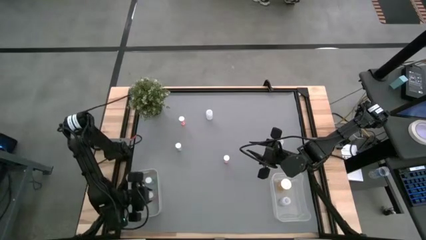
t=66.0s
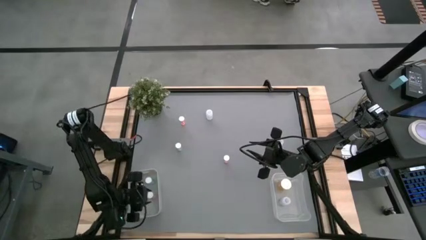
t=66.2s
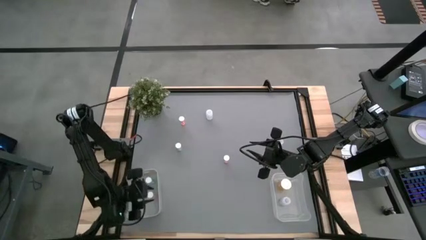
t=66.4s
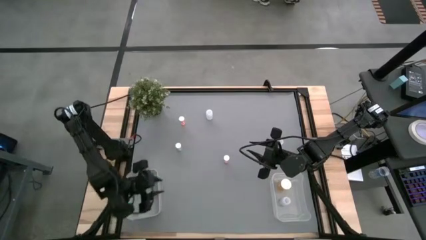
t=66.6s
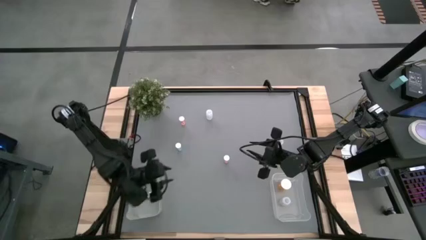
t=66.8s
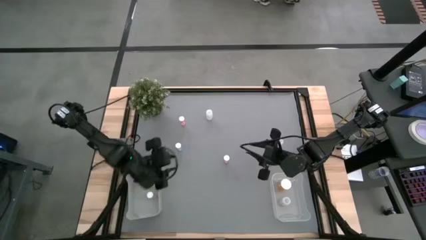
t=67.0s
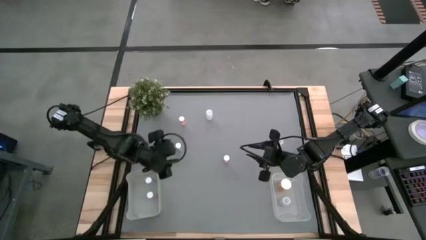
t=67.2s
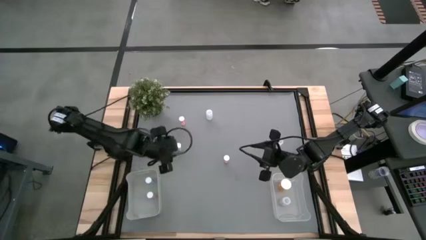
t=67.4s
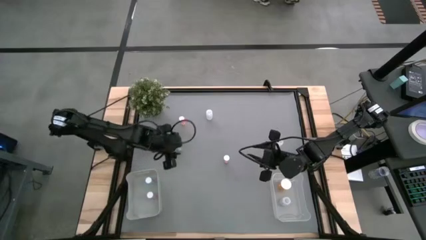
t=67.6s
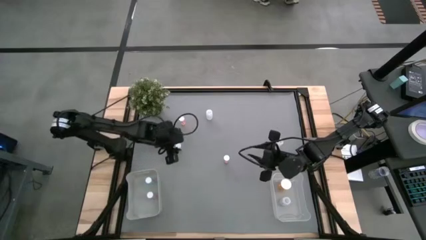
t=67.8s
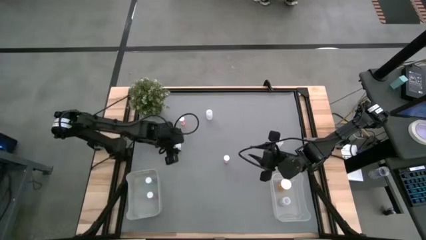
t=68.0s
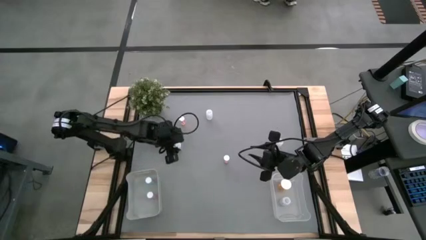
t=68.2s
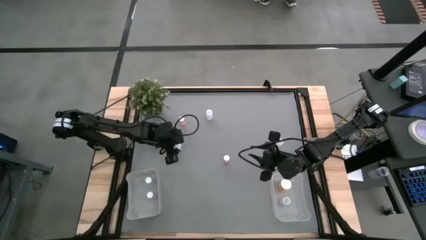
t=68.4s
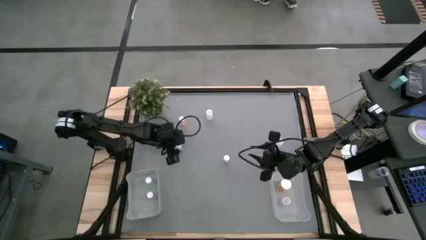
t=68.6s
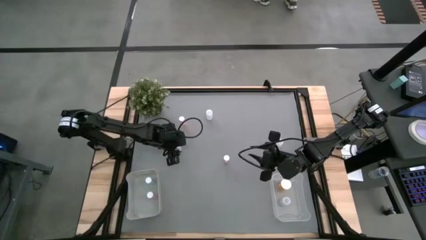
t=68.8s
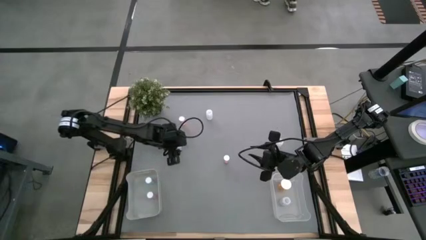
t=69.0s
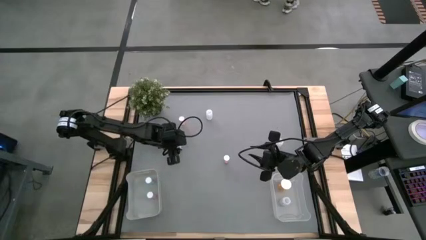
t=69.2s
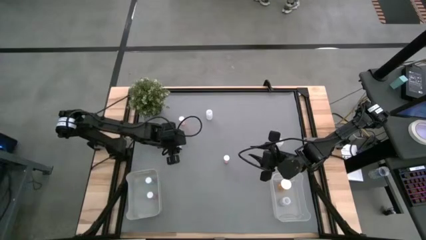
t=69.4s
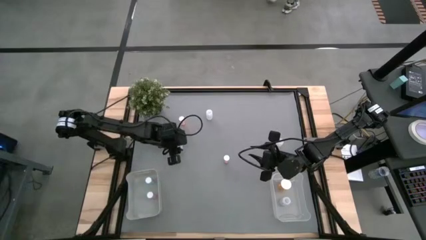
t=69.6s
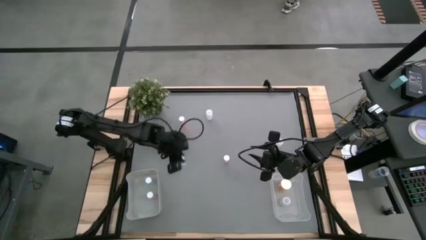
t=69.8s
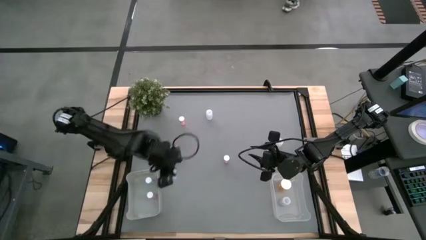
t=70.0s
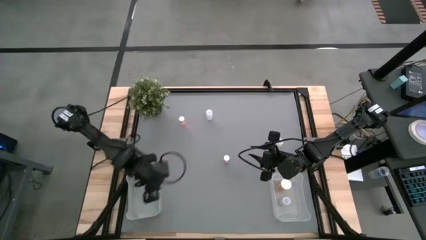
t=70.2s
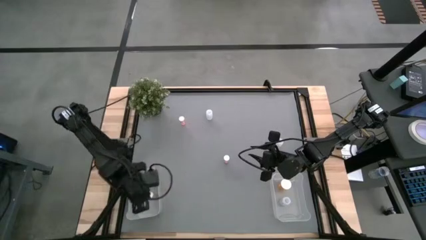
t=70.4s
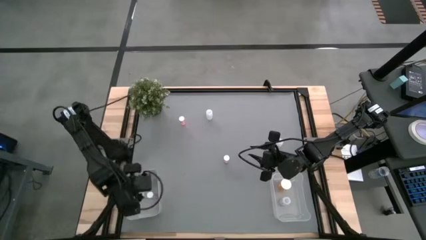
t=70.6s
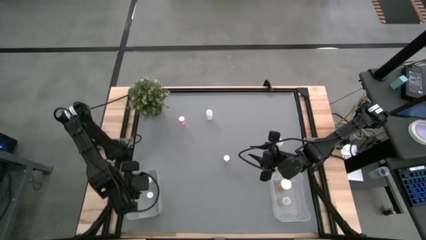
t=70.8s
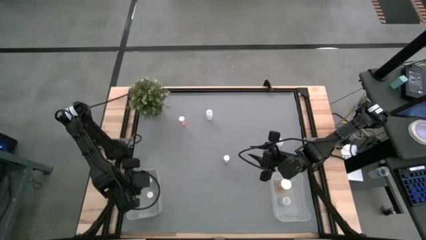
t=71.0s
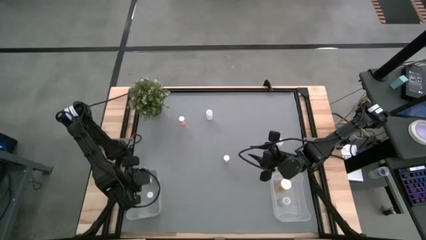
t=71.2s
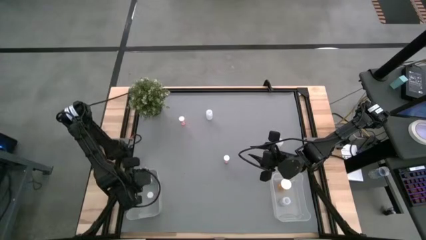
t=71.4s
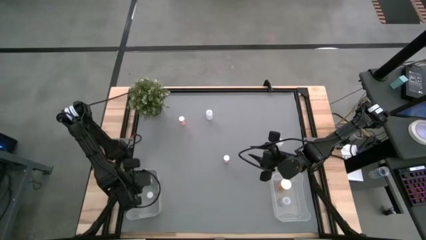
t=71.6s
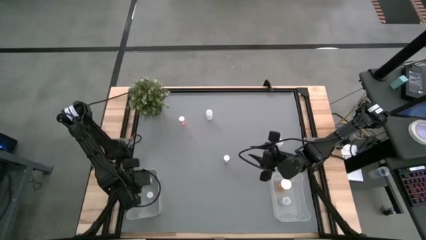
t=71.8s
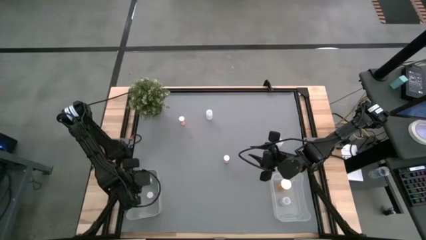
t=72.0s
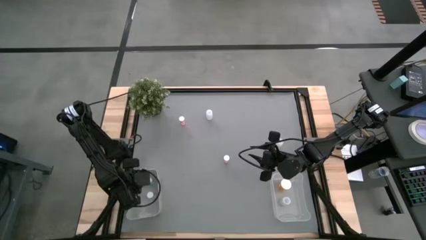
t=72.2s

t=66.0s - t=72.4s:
Task: Pick and place medicine bottles into bin by pill shape (circle, oval)
Put the blue tablet bottle into the gray bin

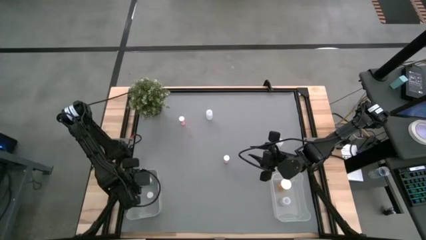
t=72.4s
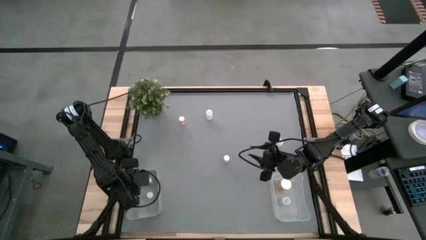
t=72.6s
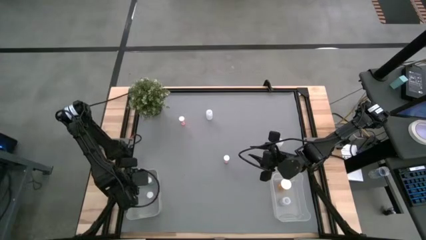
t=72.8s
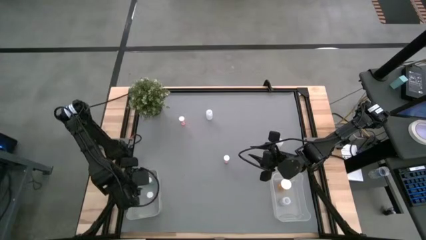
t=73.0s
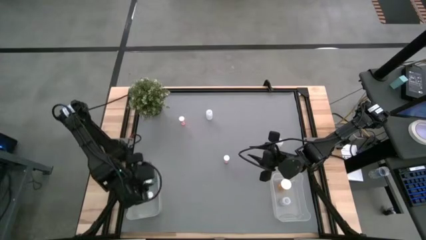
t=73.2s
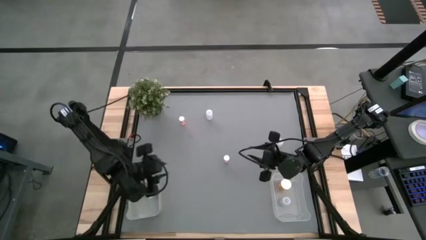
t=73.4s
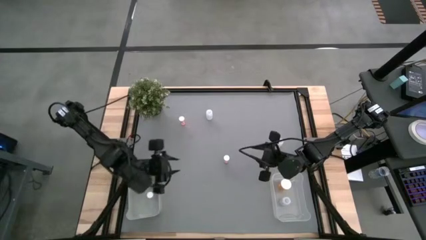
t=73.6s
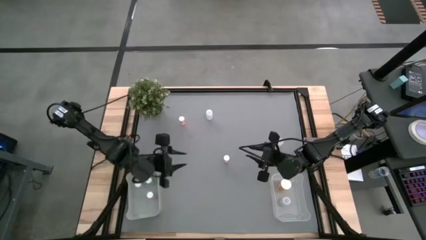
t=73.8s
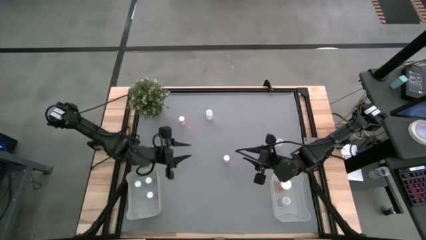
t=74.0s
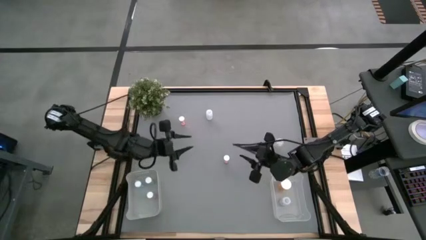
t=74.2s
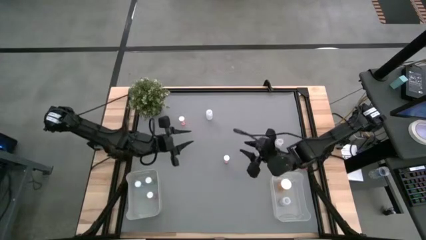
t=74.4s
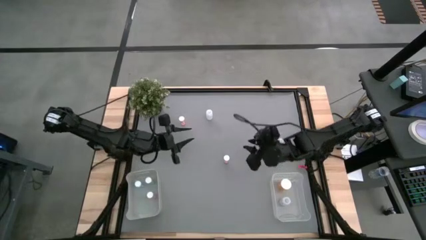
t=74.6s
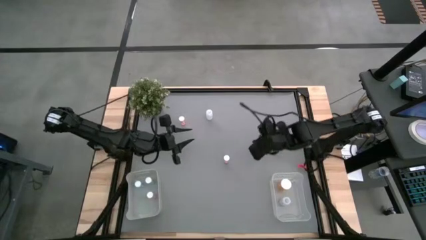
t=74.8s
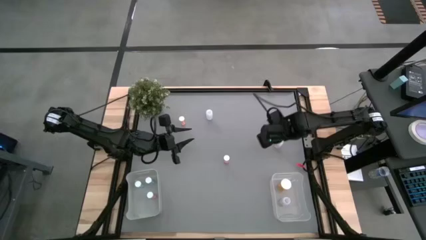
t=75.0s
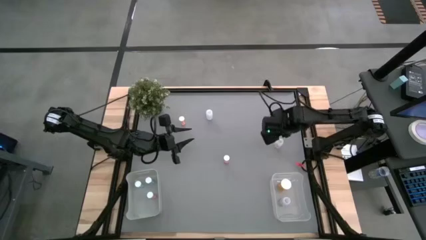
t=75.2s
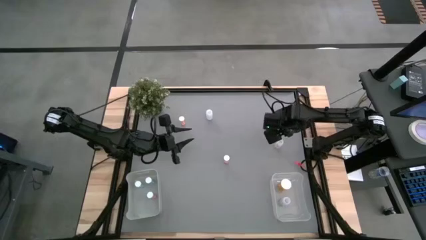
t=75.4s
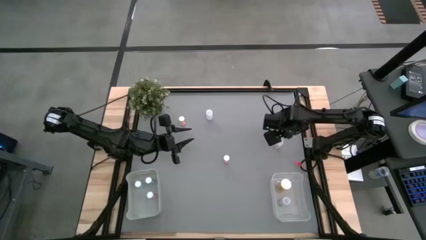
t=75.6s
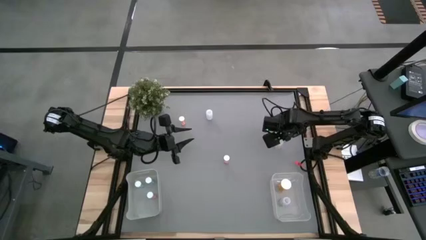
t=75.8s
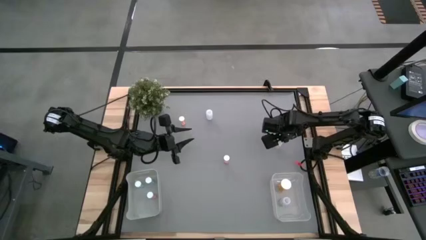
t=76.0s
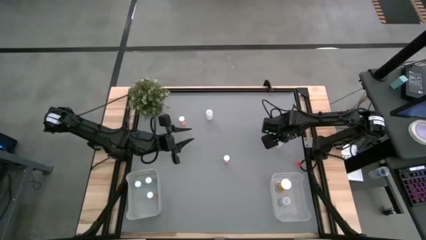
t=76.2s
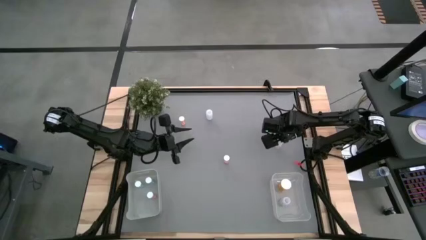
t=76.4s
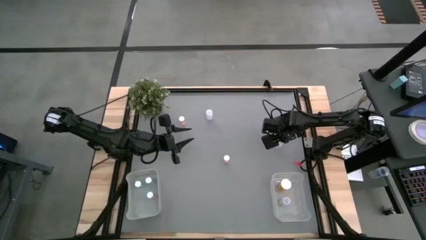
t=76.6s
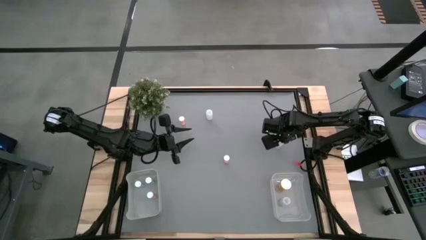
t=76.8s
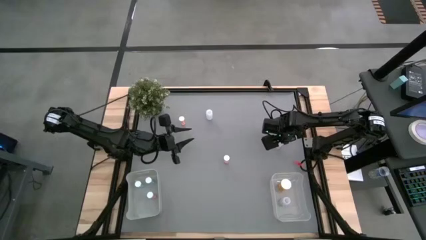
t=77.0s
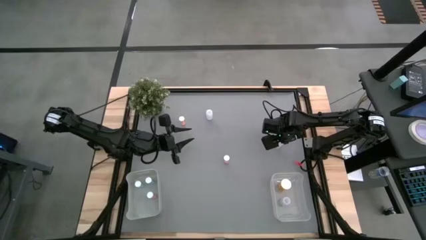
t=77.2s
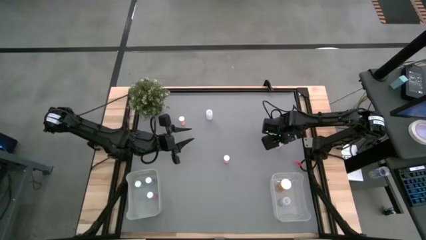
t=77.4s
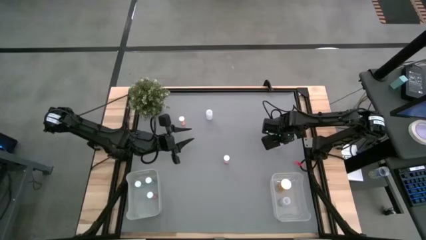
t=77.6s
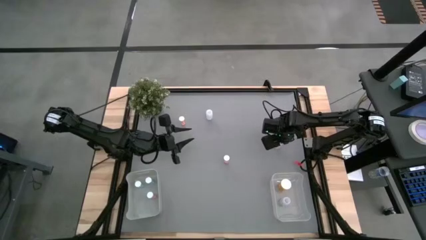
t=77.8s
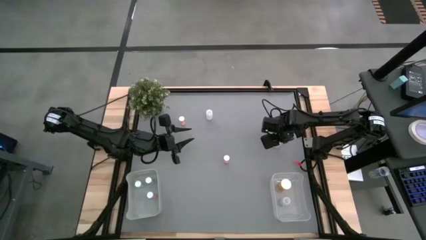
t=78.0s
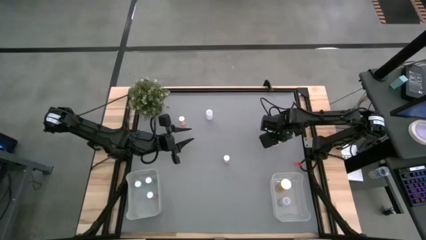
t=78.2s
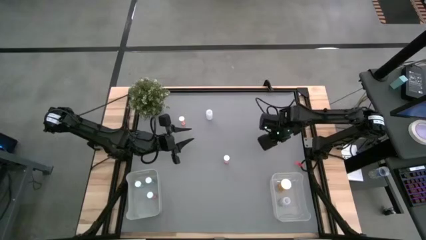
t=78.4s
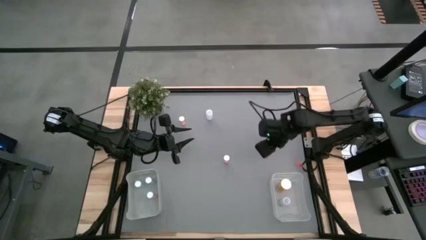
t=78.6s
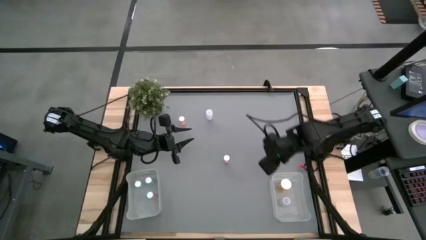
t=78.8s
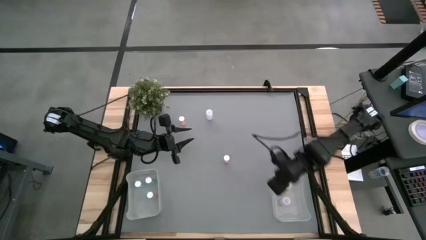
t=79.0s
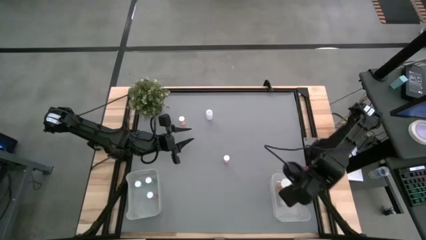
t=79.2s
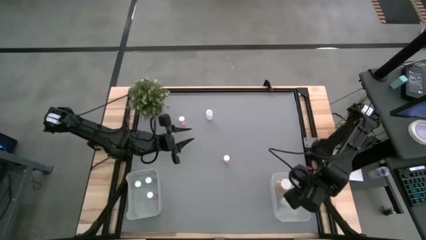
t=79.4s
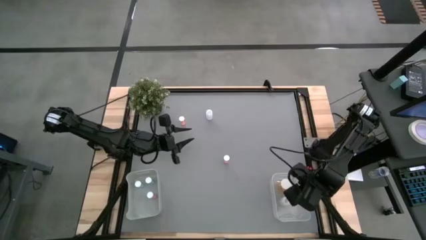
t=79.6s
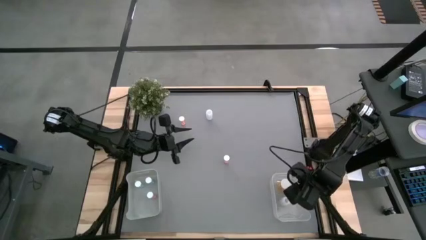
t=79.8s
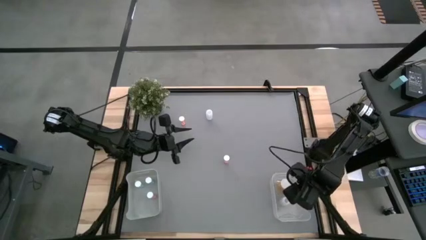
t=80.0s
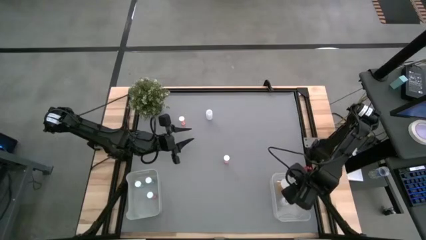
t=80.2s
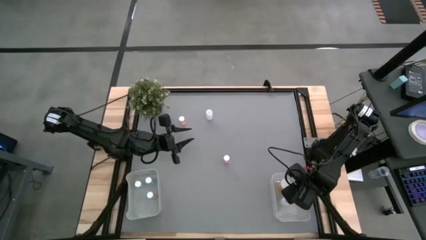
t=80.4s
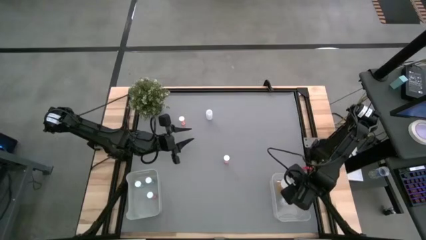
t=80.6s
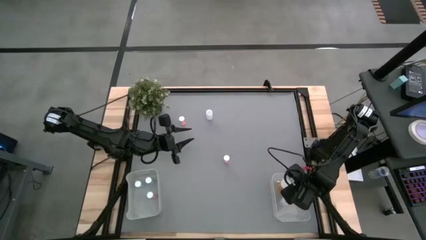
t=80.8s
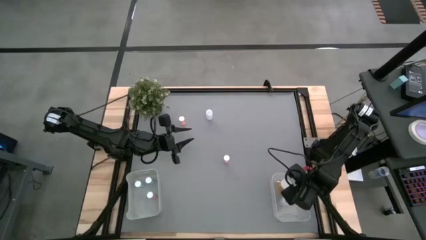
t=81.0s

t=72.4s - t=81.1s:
Put the transparent capsule bottle into the transparent bin

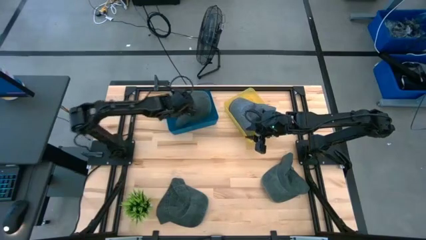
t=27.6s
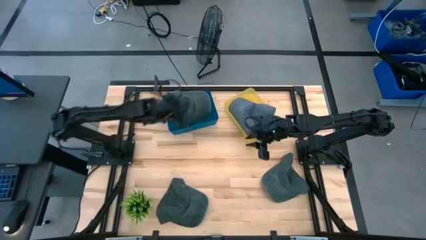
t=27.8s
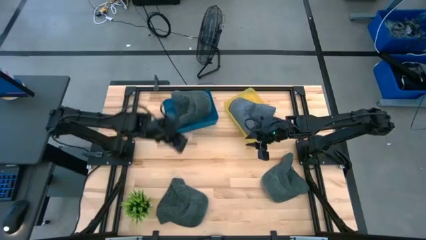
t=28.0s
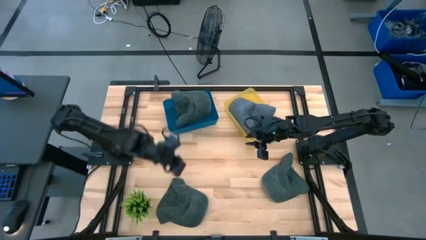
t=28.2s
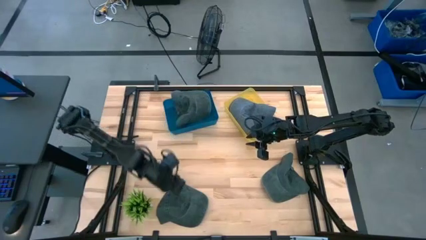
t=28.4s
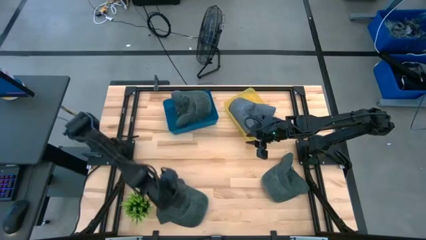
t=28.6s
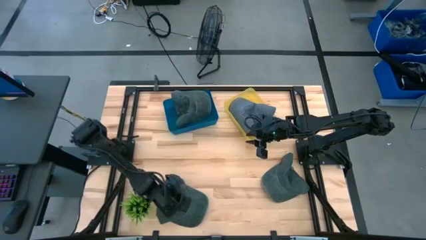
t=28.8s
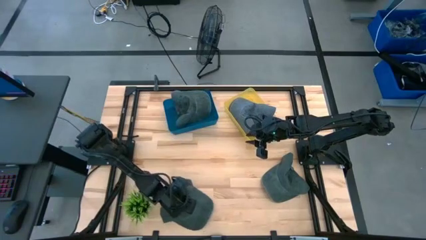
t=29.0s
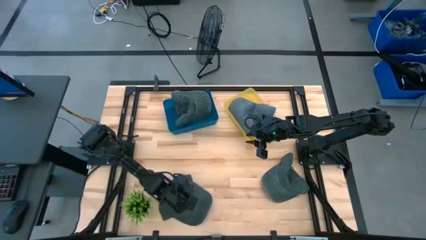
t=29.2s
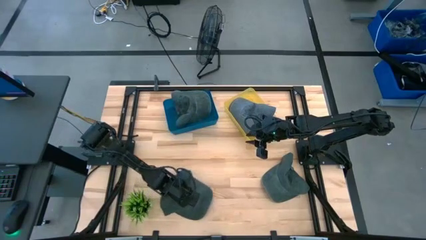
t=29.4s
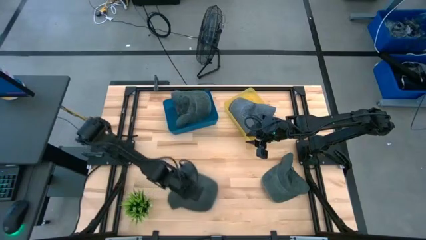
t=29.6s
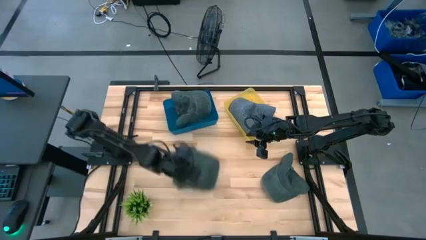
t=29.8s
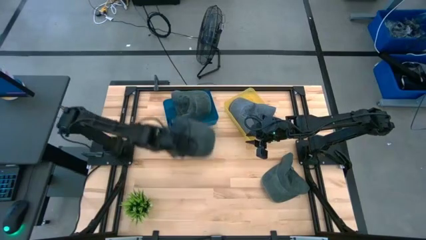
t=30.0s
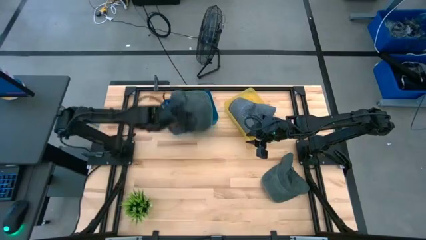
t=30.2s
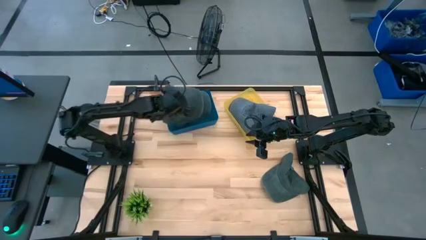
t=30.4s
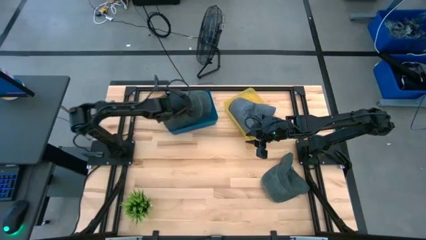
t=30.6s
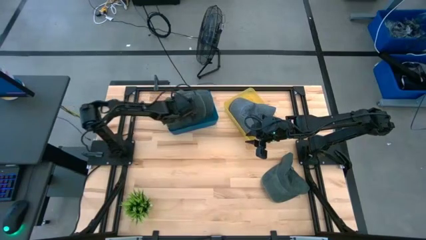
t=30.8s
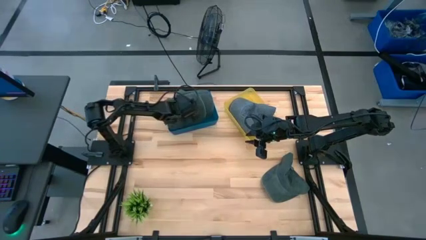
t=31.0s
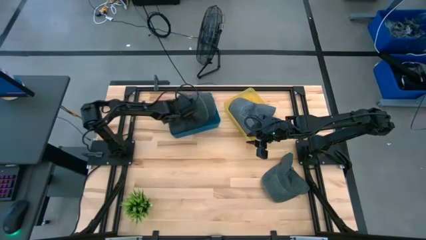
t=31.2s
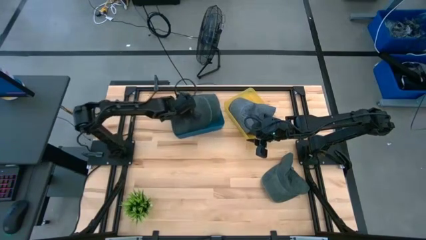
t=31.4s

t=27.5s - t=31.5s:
Task: Pick & Place hat
Put the bottom green cap into the blue bin
